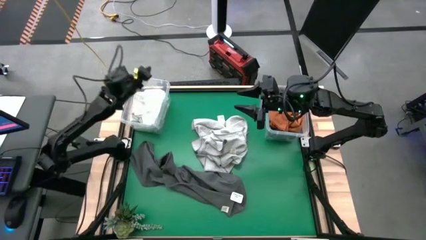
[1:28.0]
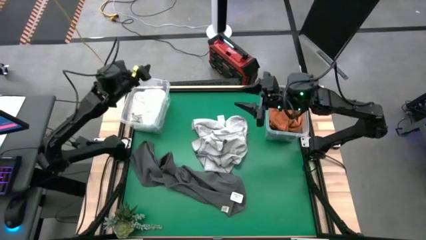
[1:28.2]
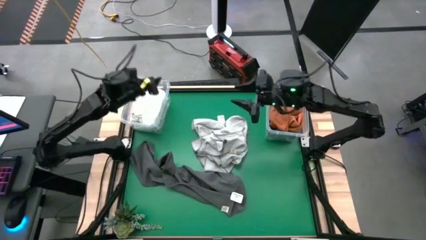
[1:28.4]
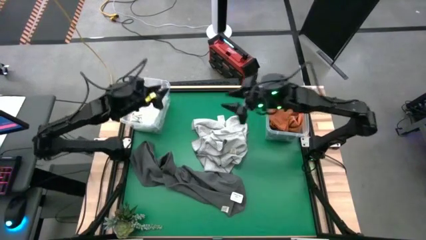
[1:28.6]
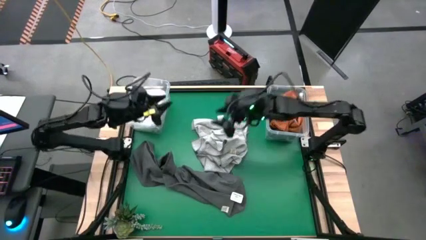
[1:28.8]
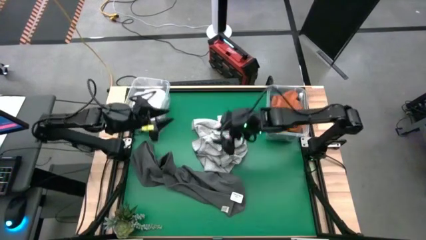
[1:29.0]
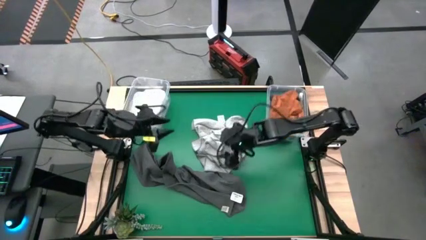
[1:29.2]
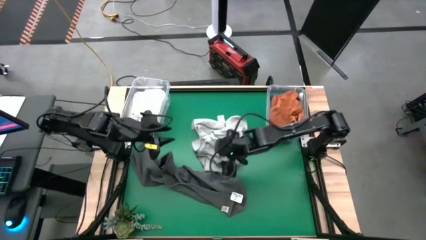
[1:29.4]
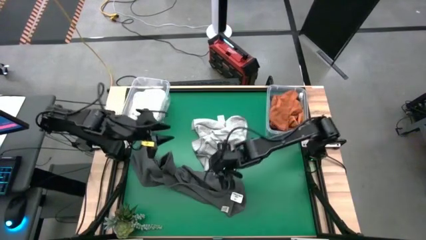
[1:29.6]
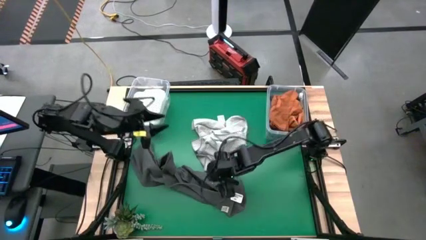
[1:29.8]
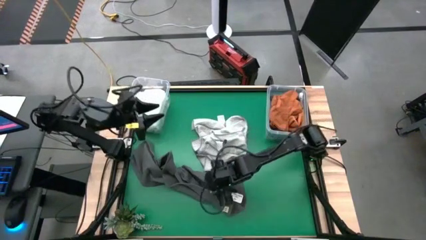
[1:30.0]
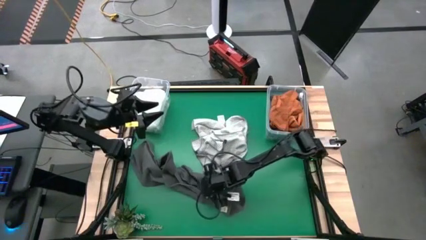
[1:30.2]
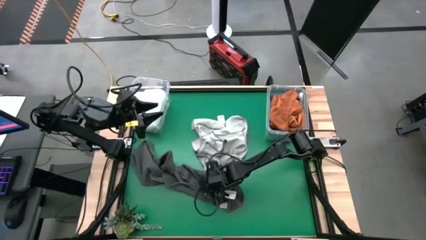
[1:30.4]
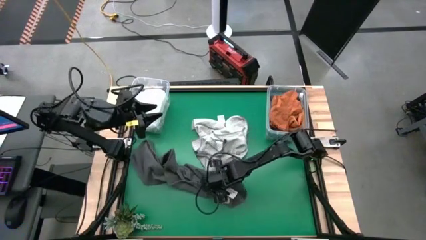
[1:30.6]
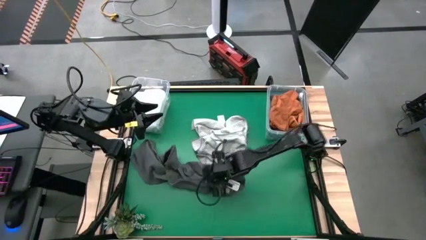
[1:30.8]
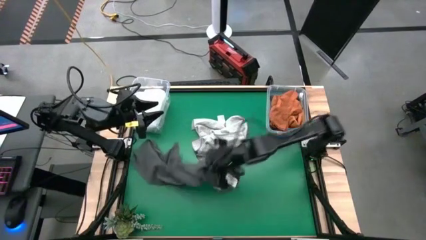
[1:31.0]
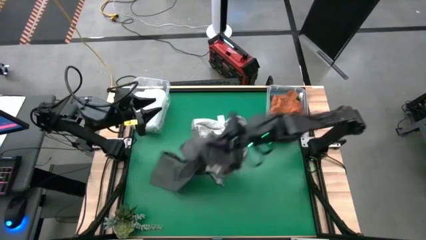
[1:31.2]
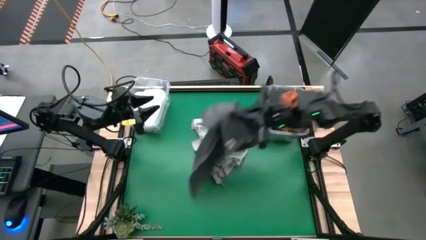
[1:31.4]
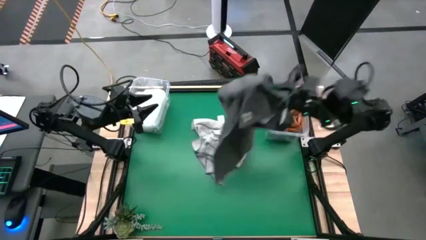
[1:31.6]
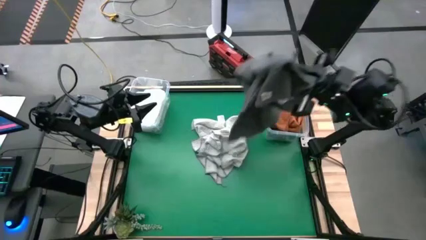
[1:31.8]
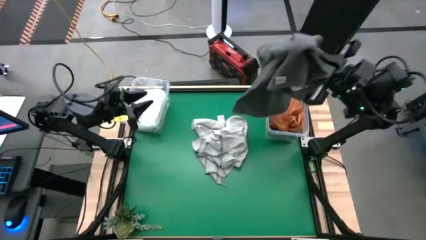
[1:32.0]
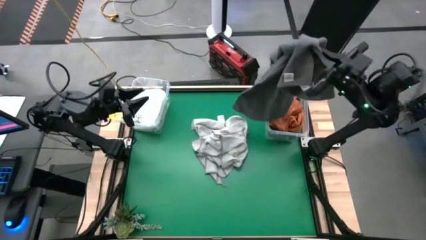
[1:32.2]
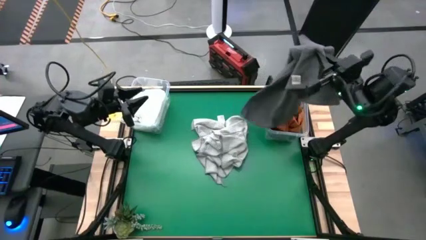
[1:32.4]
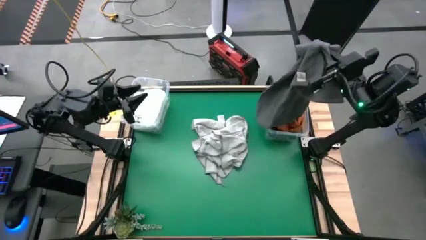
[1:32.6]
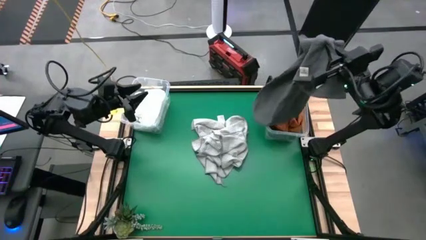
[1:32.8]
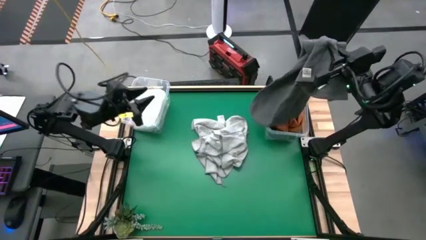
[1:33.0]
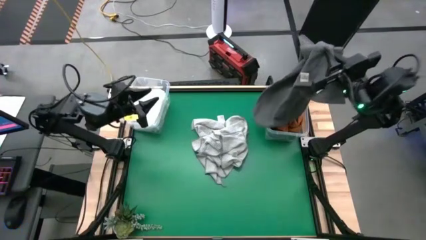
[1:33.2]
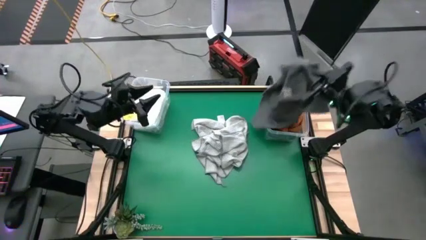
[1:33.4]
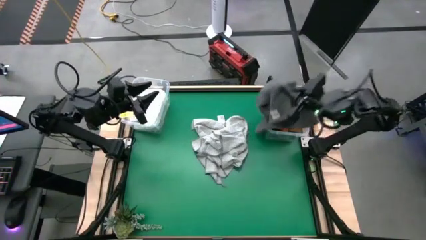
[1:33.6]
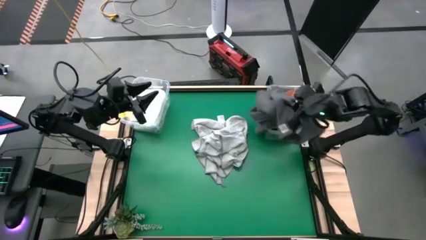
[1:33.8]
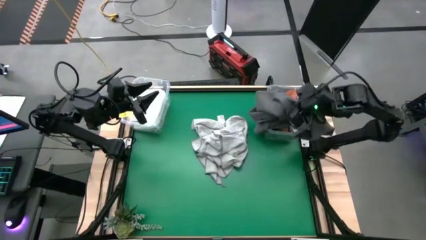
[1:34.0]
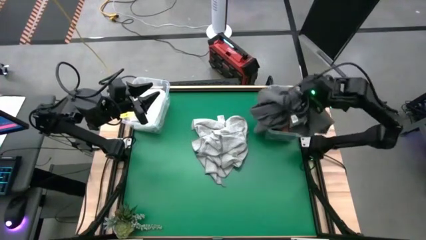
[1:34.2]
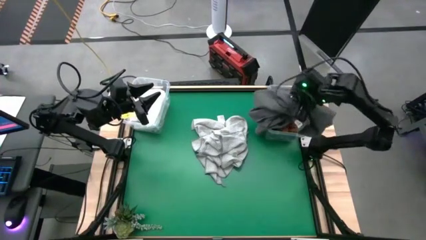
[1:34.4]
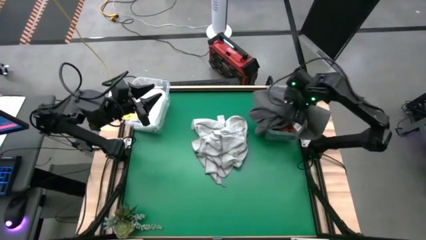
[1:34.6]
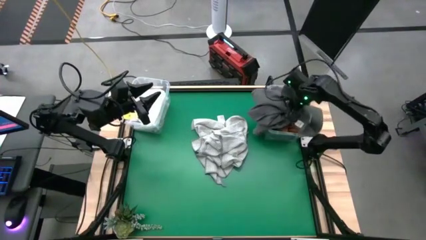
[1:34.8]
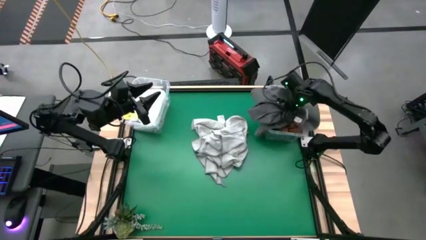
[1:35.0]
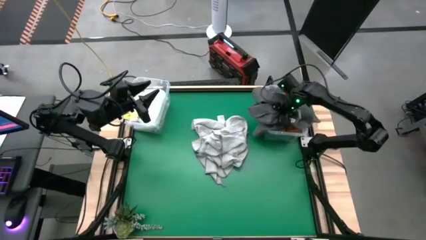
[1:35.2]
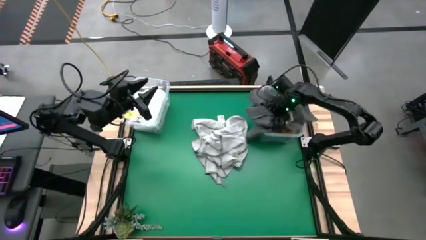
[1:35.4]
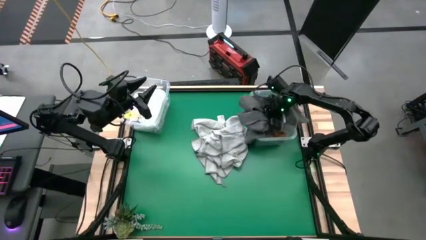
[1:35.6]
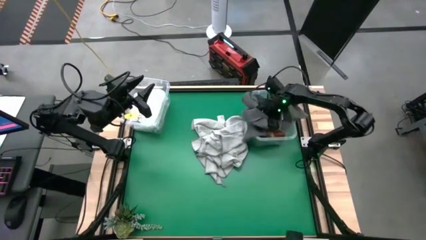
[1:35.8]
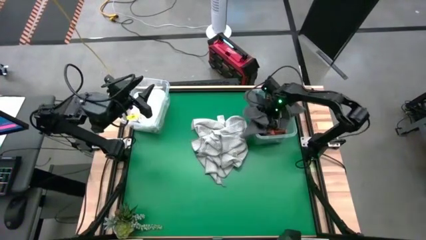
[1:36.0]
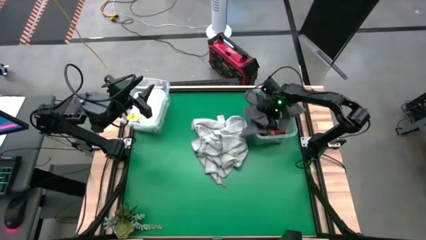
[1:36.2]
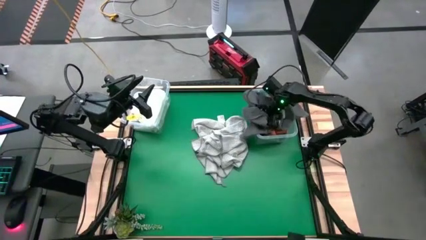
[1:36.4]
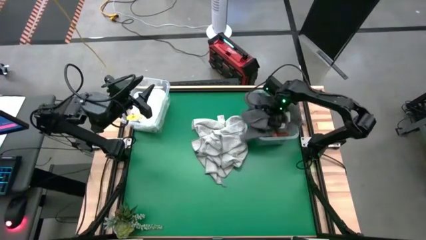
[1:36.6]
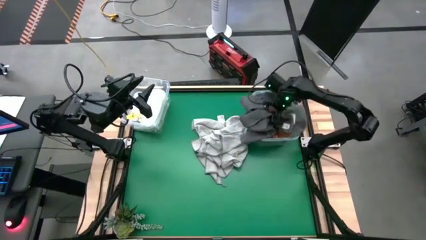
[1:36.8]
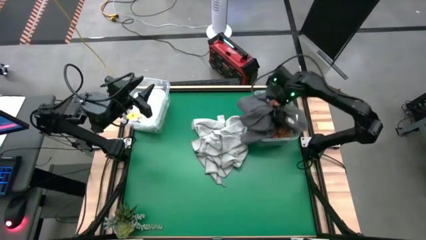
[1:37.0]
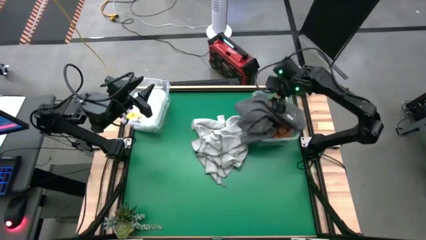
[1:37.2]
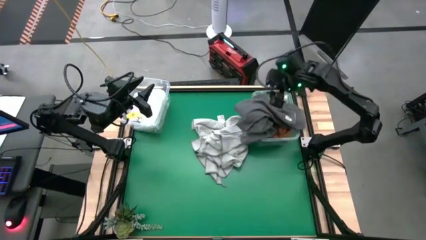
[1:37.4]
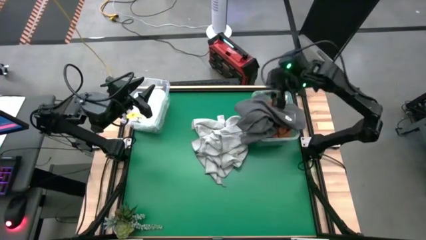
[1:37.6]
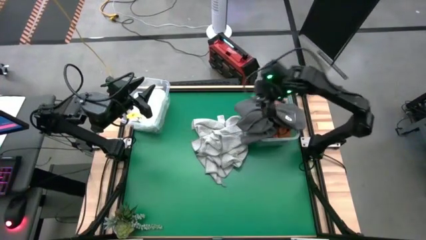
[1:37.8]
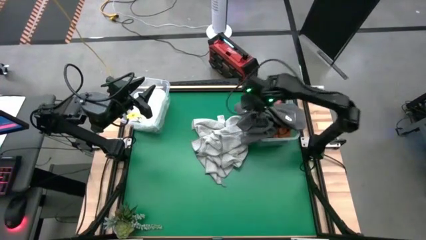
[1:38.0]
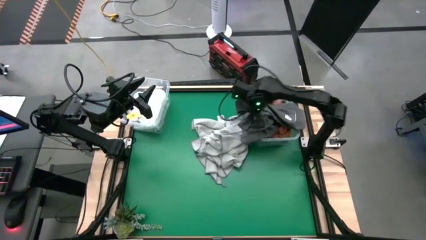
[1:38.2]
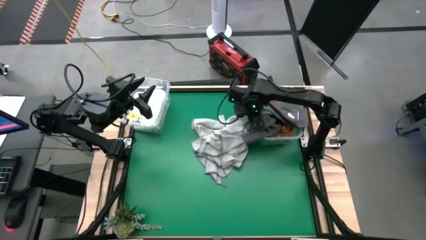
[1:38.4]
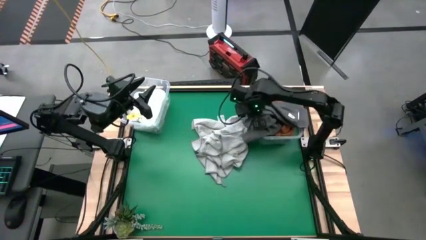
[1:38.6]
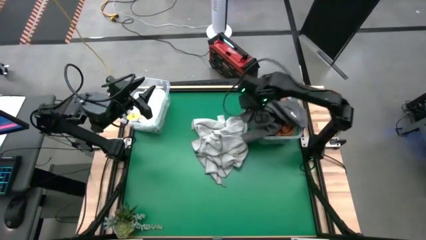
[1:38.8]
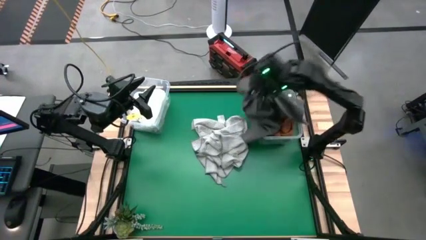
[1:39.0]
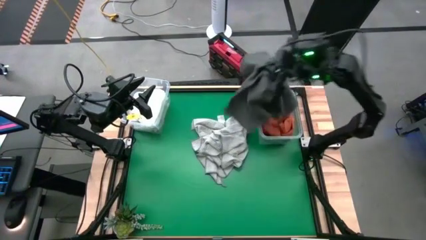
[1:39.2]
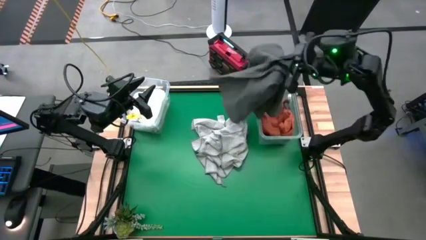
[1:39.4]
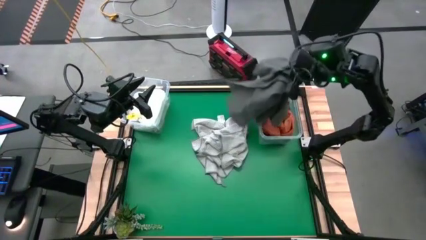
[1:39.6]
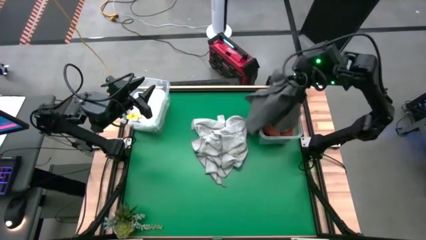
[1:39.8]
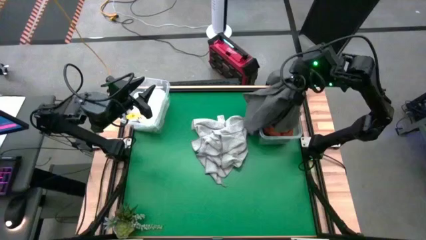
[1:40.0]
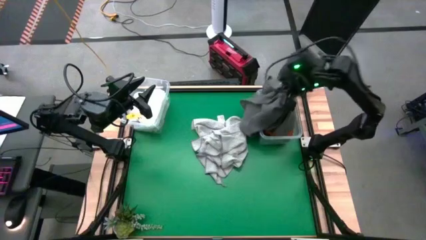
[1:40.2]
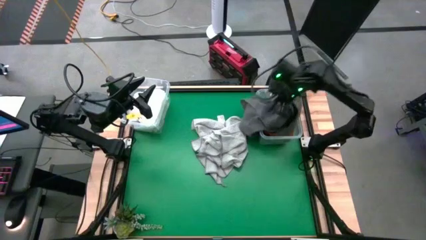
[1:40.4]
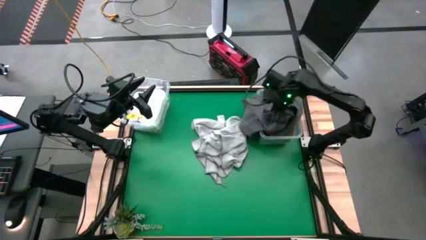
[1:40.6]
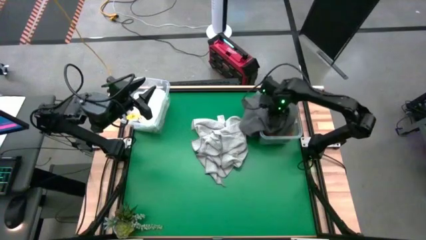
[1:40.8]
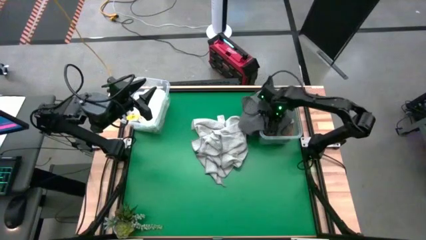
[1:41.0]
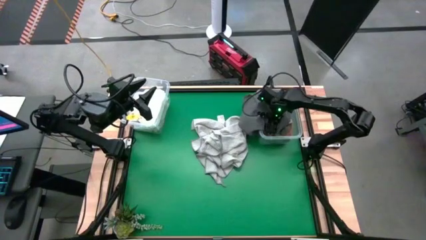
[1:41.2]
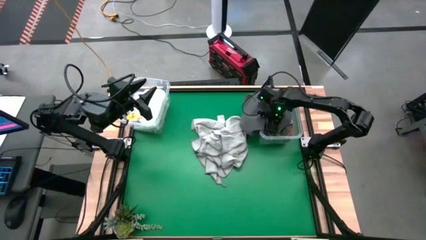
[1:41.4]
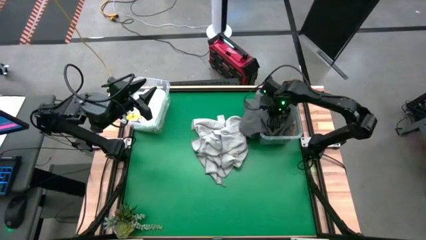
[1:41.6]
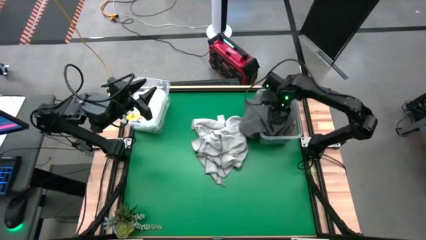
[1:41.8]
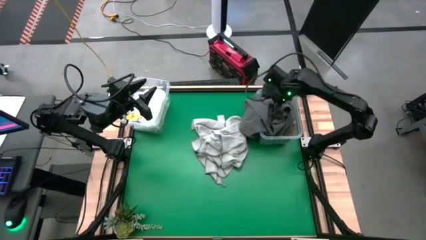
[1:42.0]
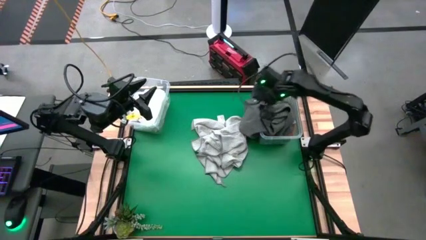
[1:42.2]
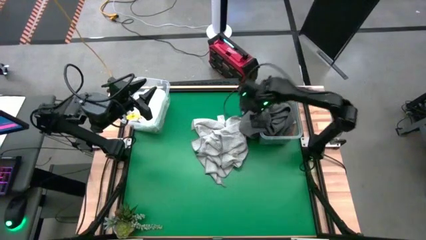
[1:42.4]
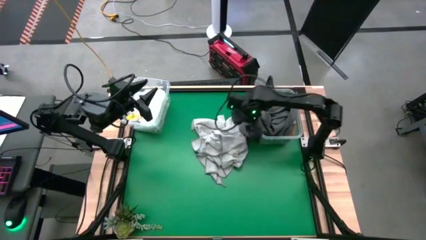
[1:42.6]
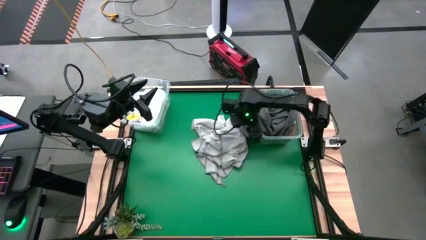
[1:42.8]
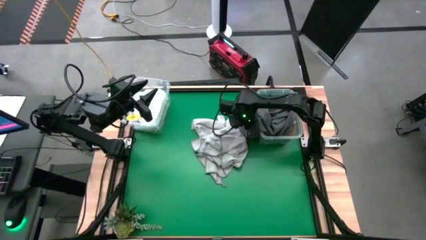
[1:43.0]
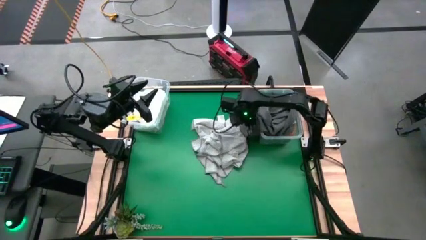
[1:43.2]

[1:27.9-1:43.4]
Task: Sort towels by color in basket
Put the gray towel into the right transparent bin

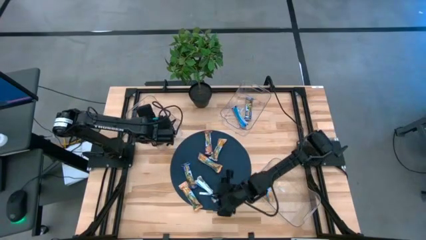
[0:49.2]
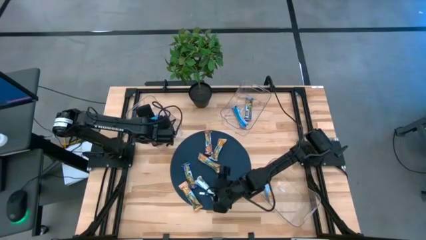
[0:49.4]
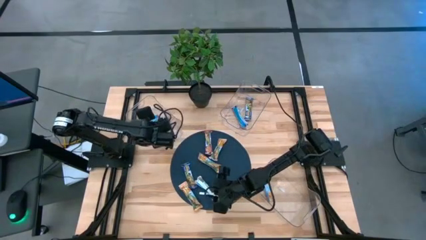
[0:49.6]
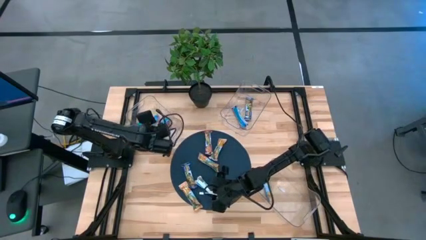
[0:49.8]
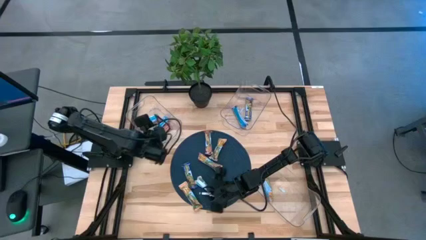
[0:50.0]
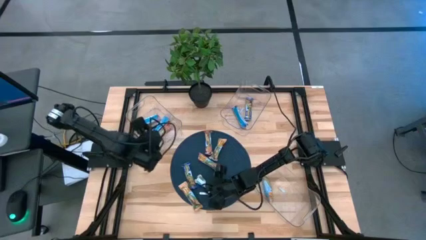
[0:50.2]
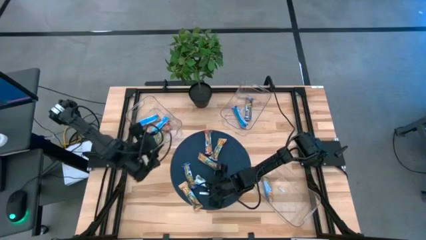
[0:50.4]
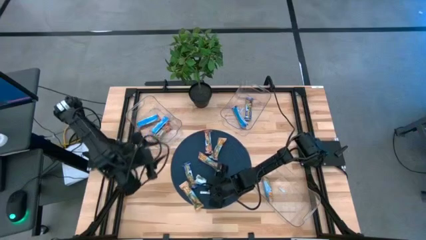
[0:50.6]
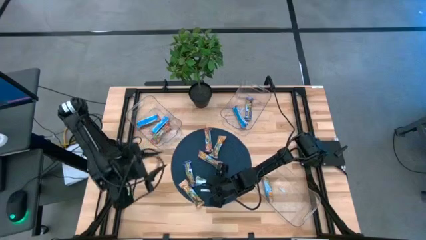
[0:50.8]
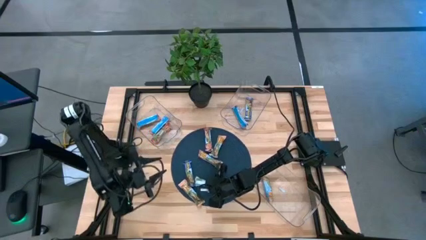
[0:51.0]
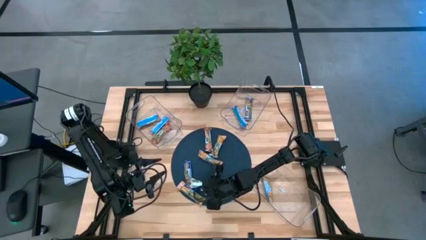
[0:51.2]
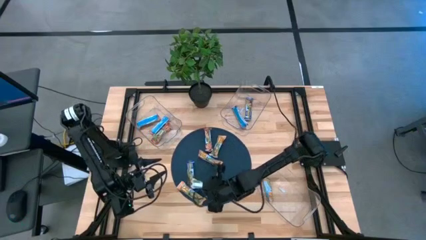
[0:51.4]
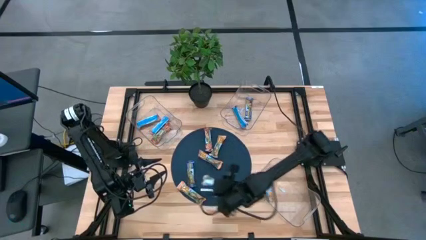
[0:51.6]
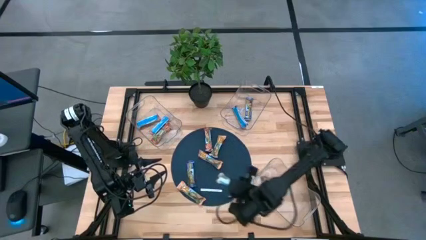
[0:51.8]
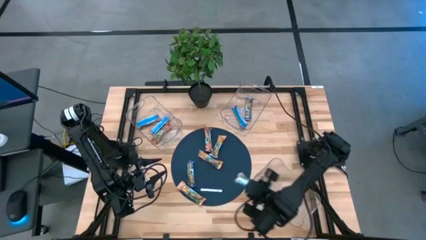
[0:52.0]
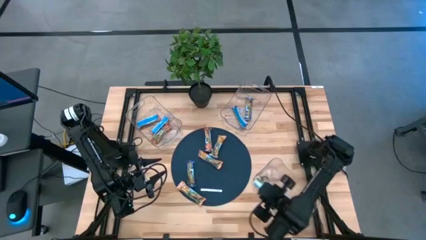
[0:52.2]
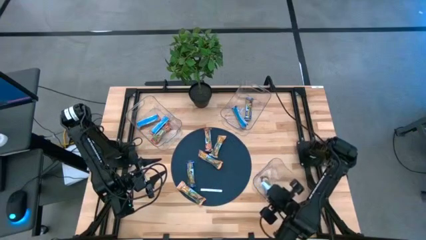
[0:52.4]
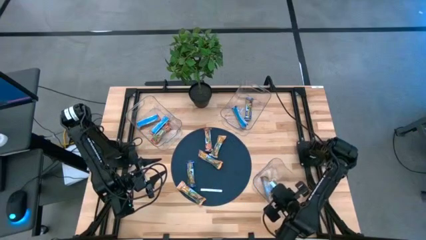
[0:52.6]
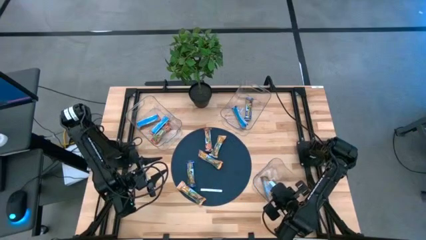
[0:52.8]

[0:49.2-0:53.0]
Task: Pick and place Granola Bars by type
Put the yellow granola bar into the bottom transparent bin
